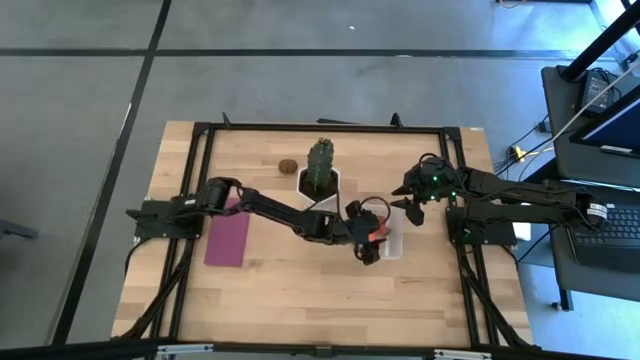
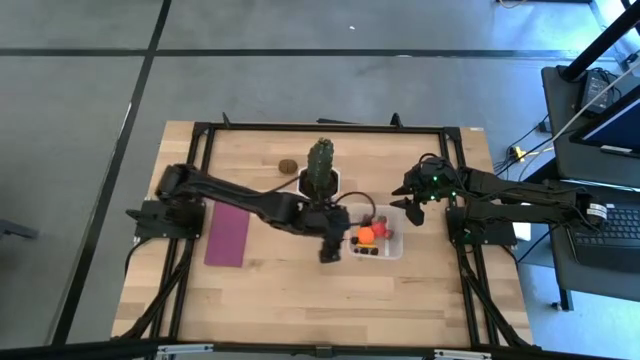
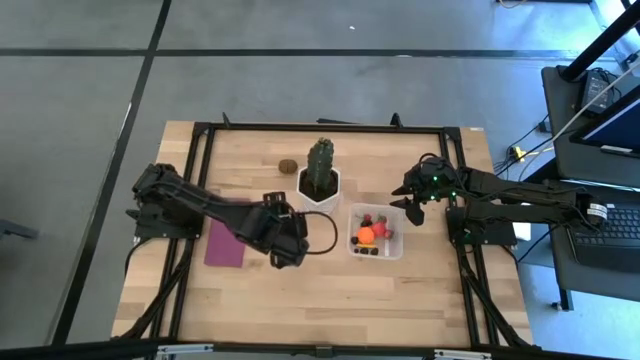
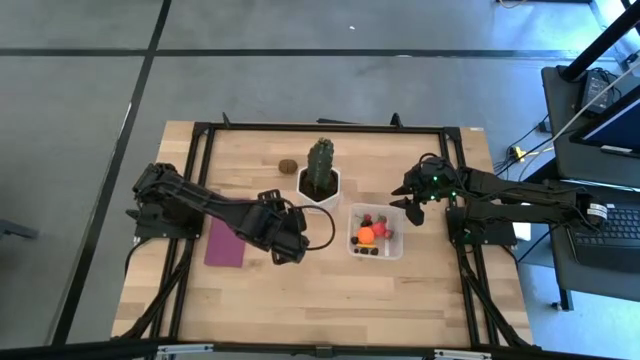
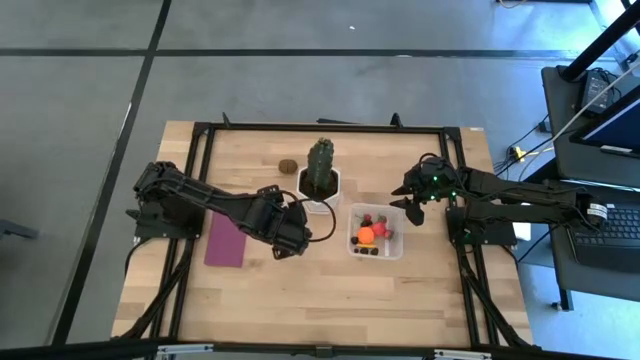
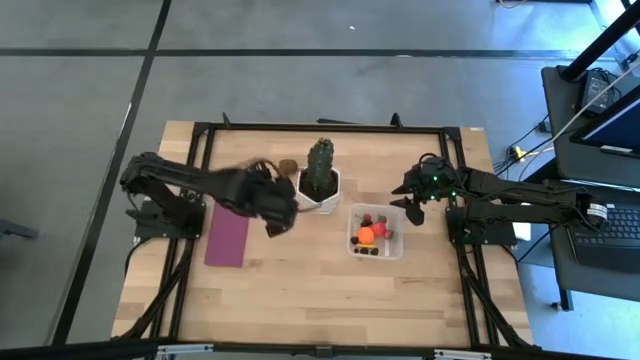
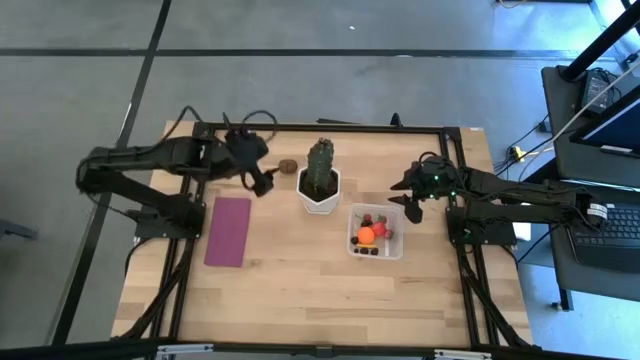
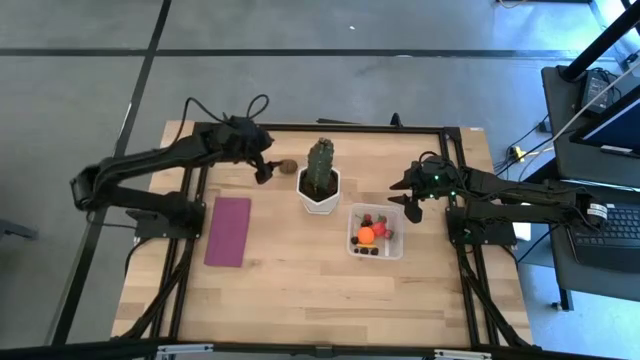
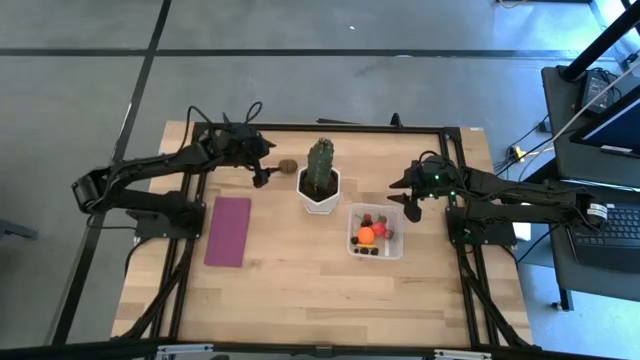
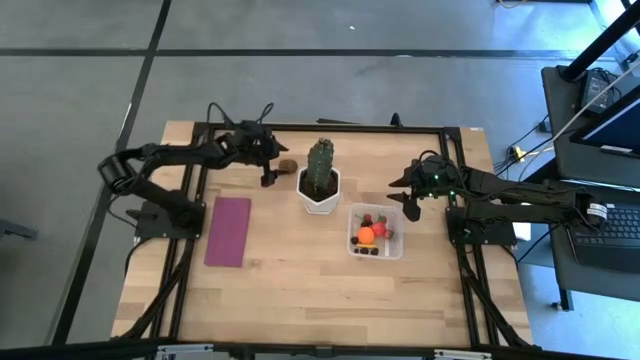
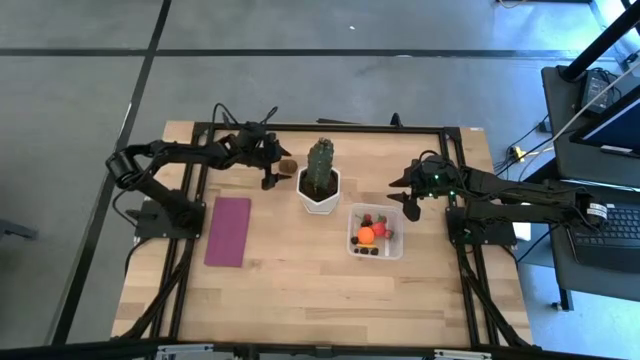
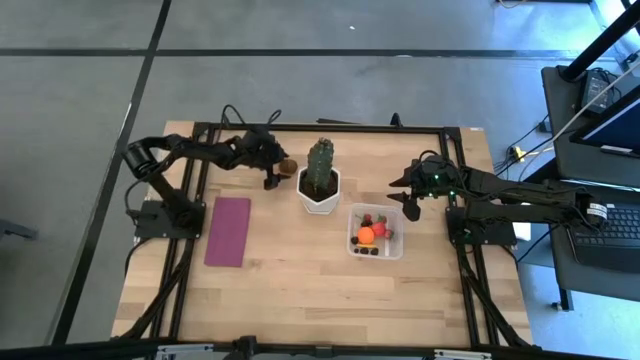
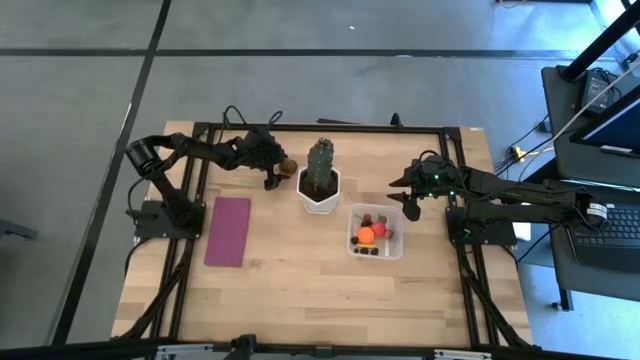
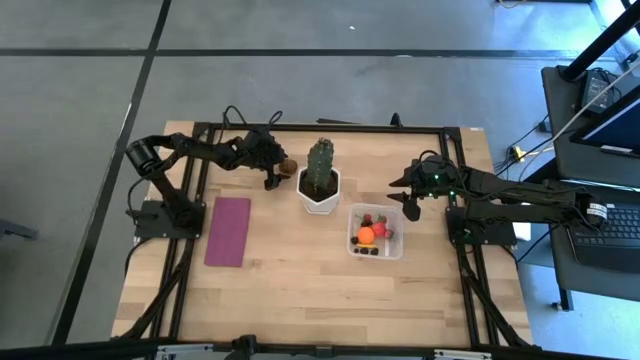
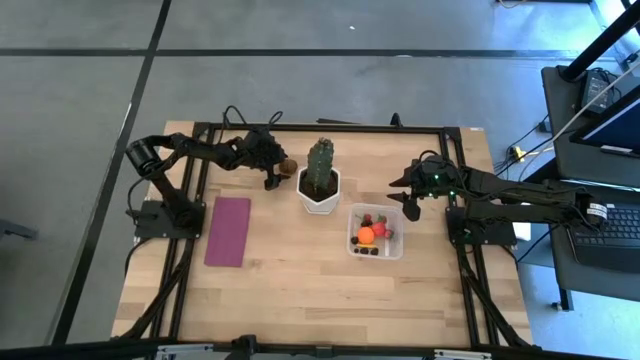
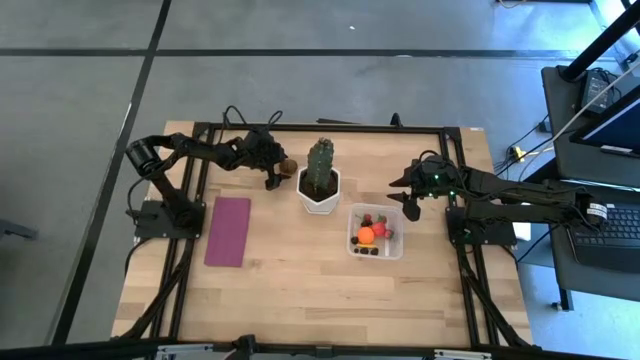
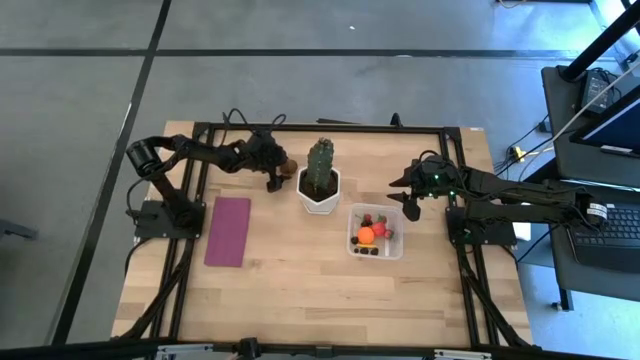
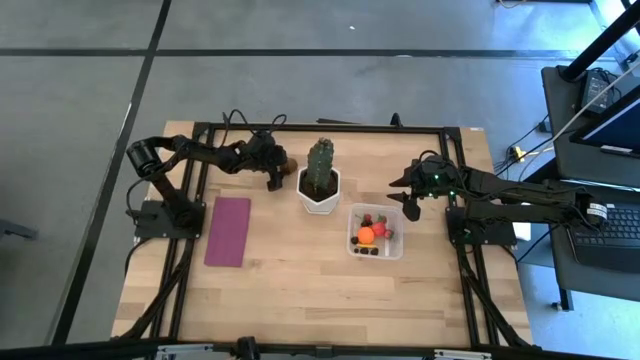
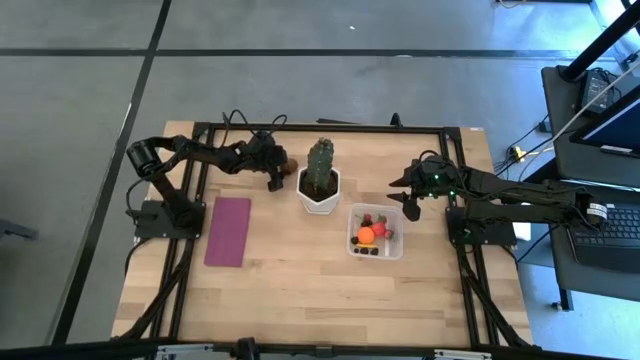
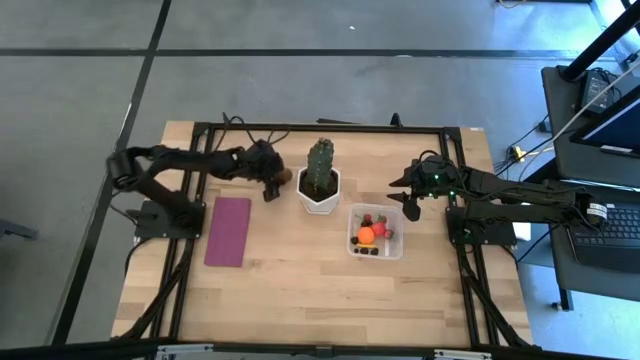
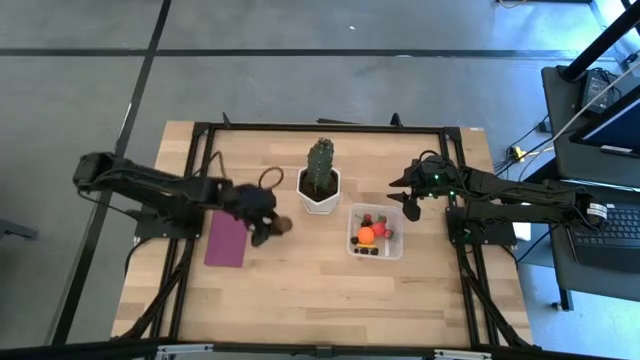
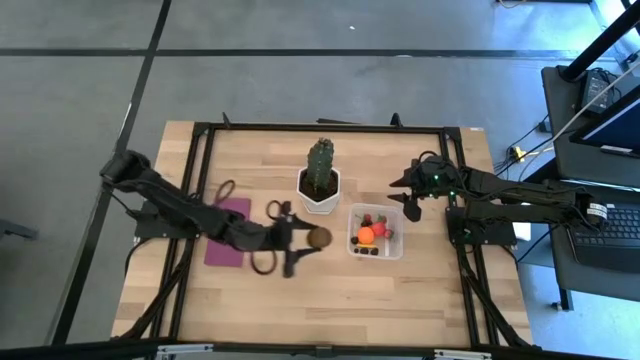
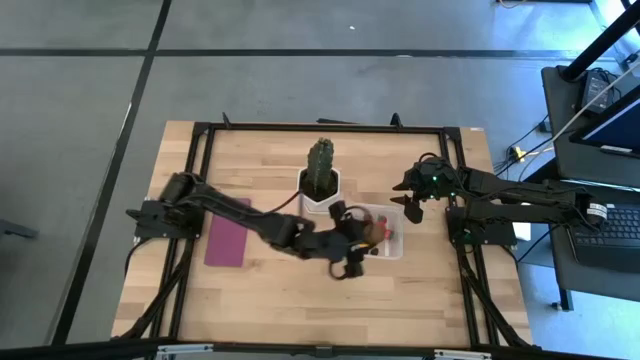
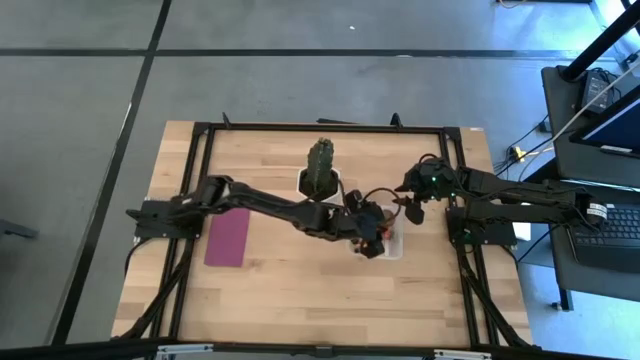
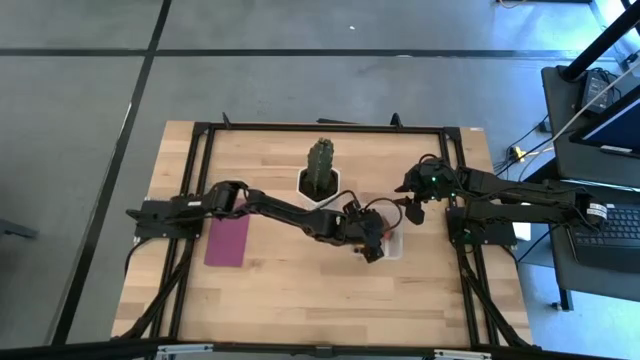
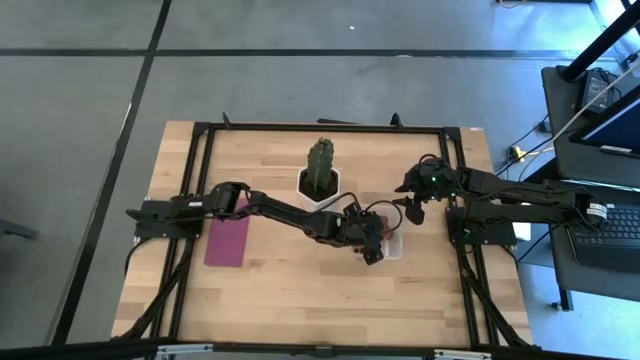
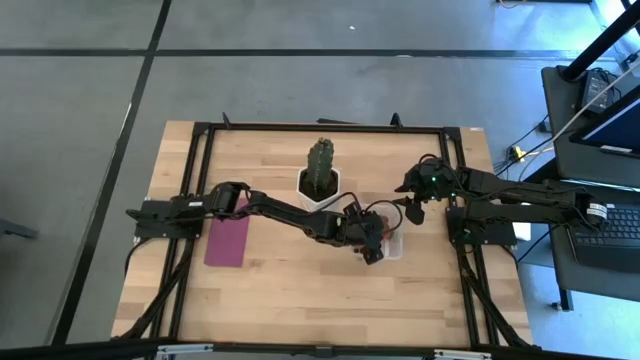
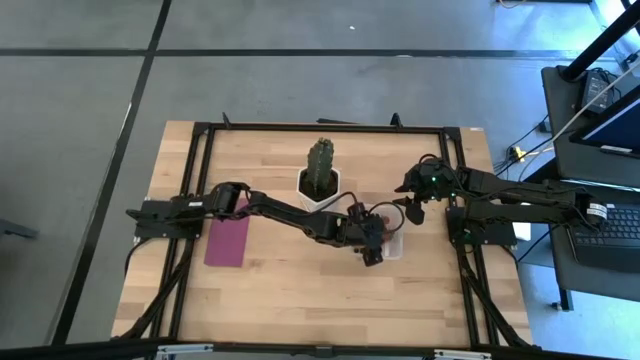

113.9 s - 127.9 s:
Task: Pick and placing Produce into tupperware
Put the kiwi into the transparent bin

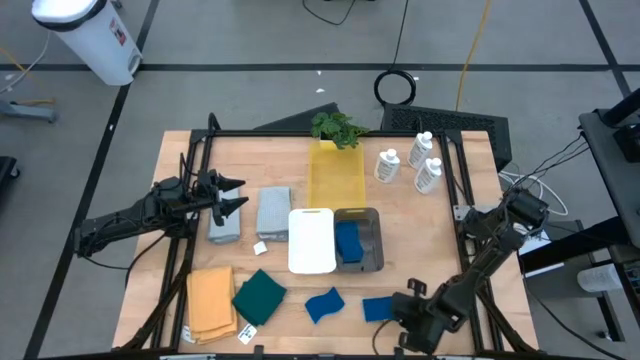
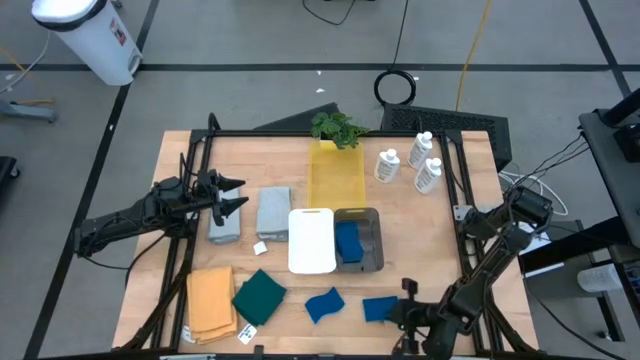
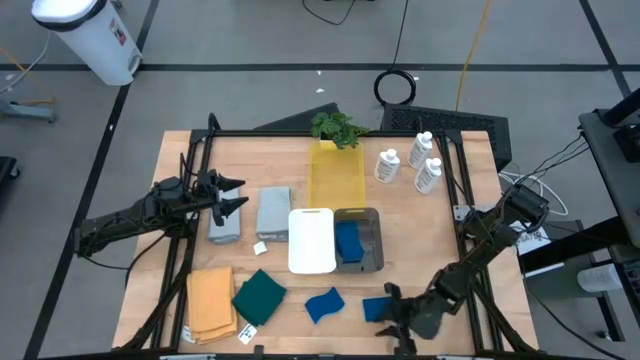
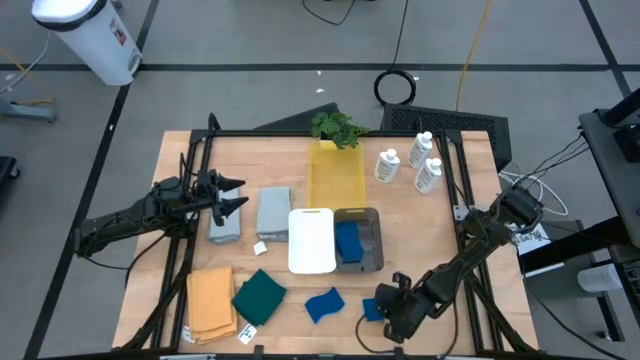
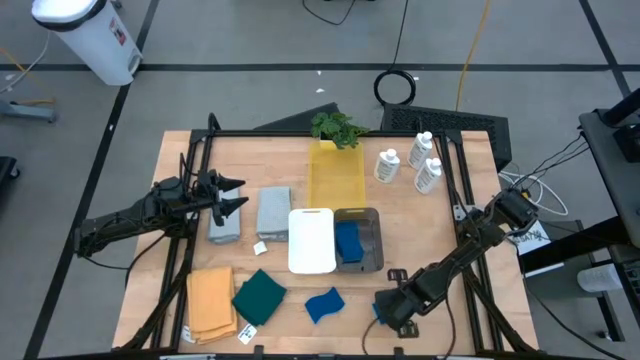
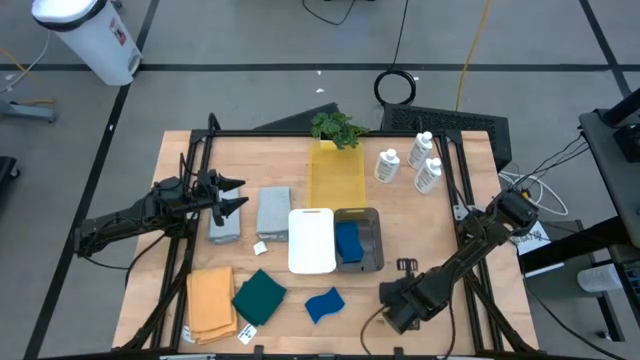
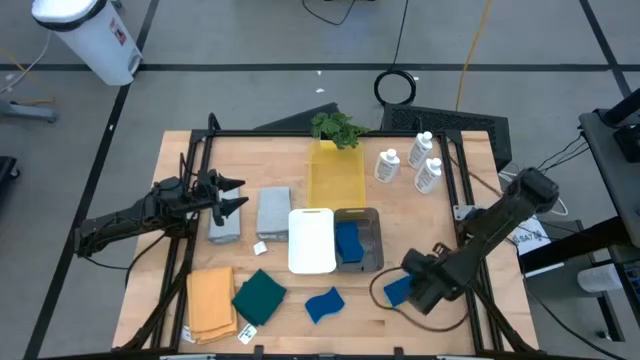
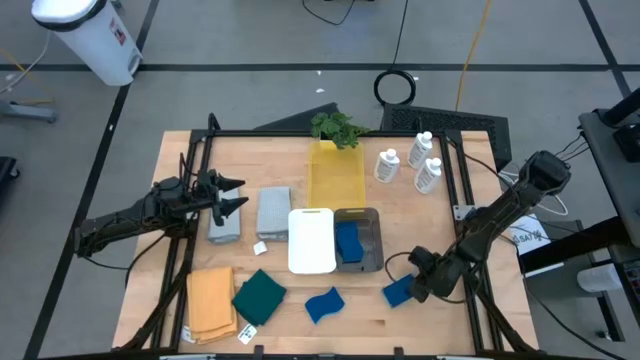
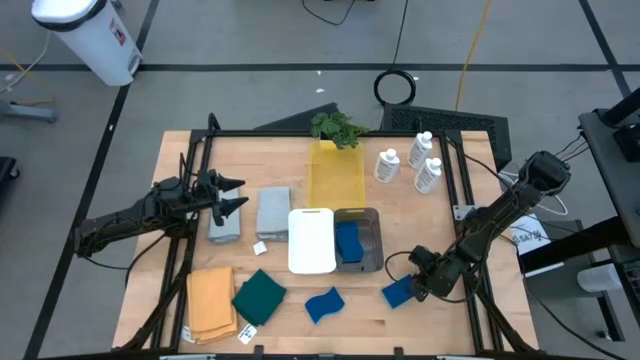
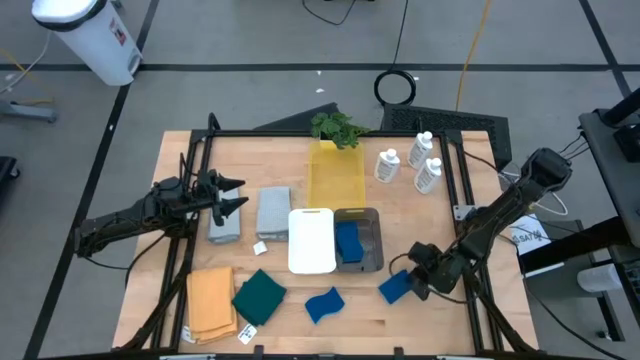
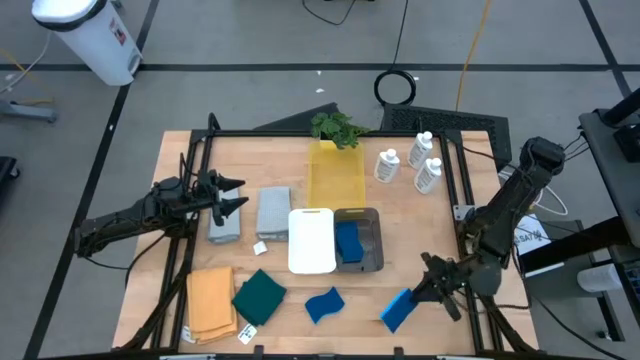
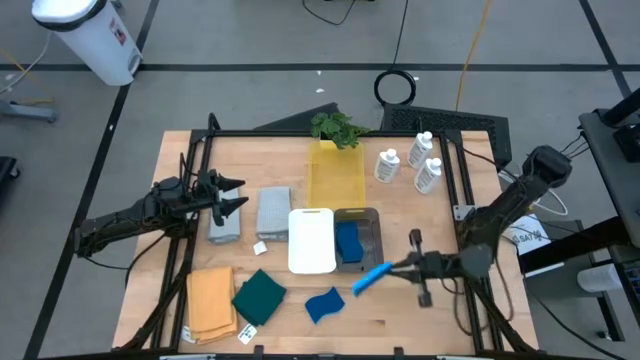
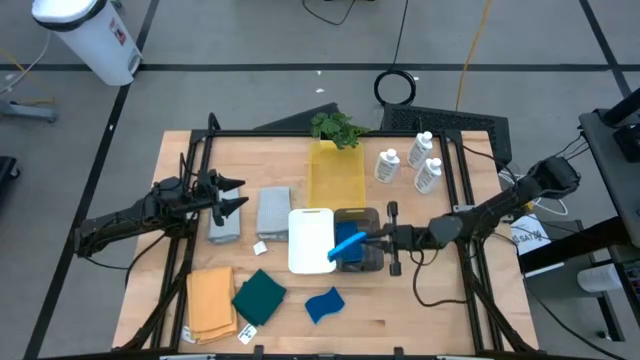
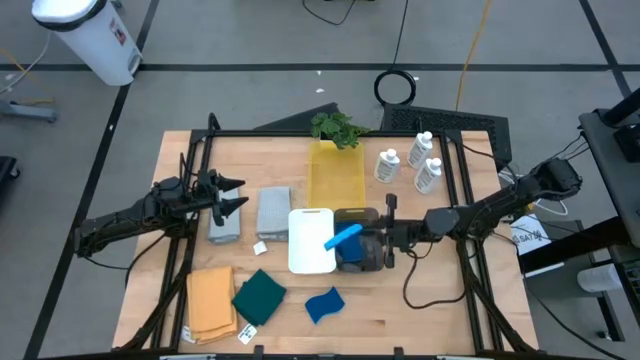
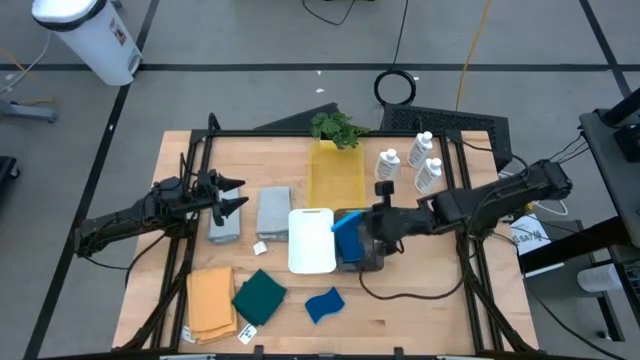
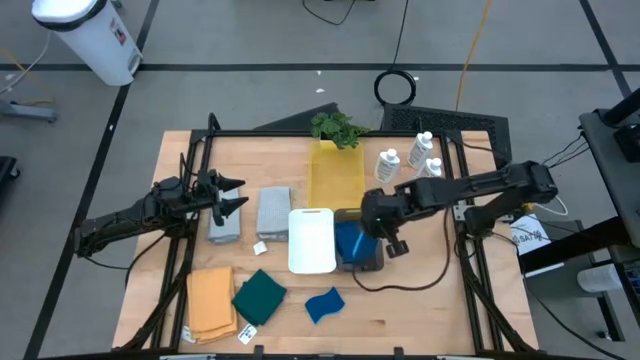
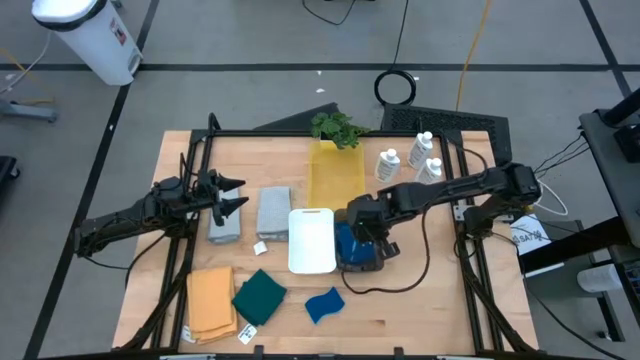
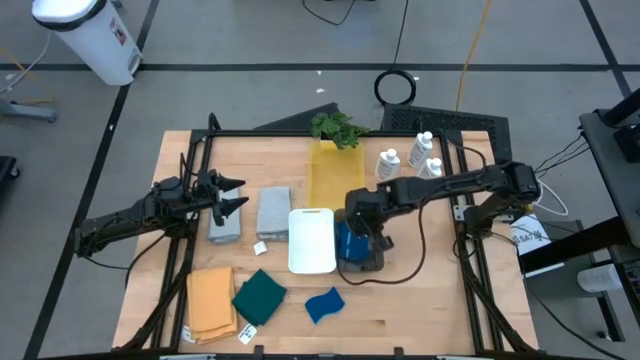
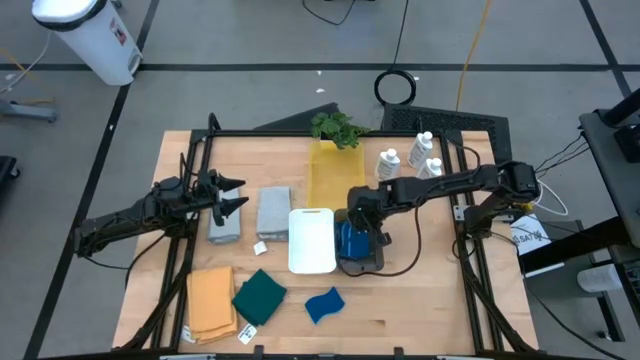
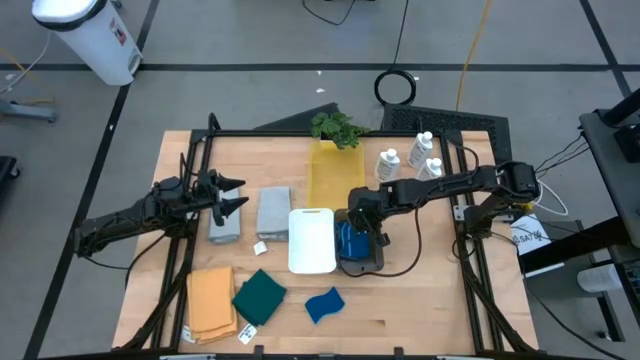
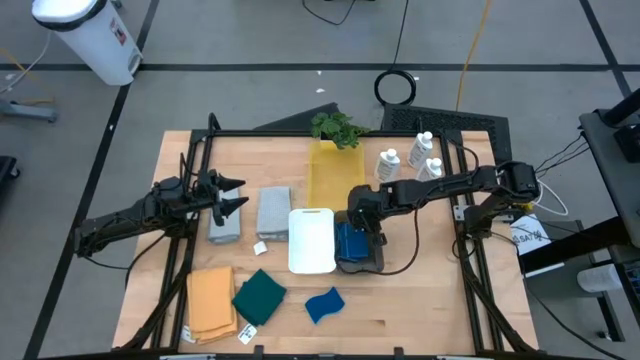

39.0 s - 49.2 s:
Task: Pick & Place Kitchen Items
Put the right sponge wipe into the black bin
